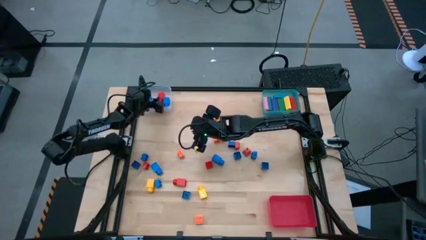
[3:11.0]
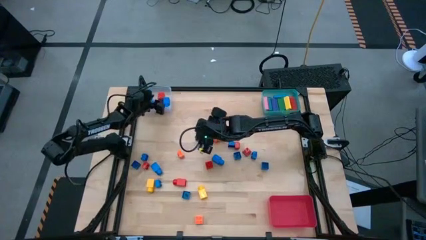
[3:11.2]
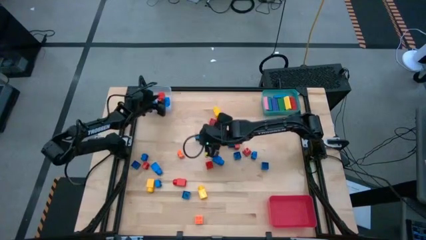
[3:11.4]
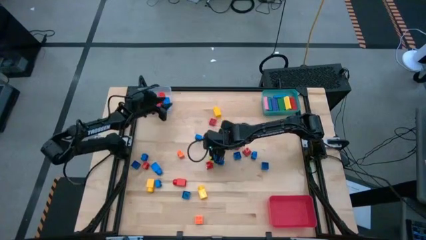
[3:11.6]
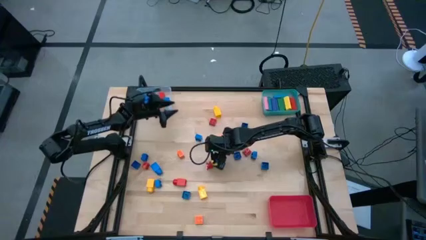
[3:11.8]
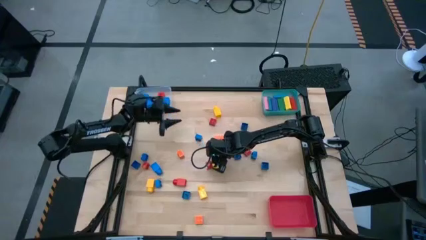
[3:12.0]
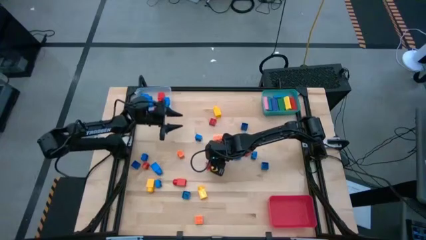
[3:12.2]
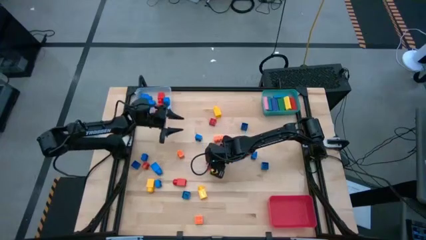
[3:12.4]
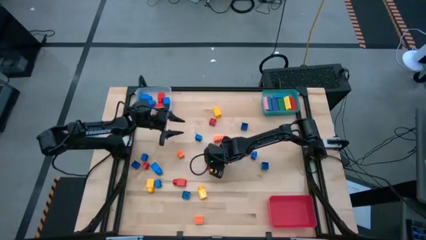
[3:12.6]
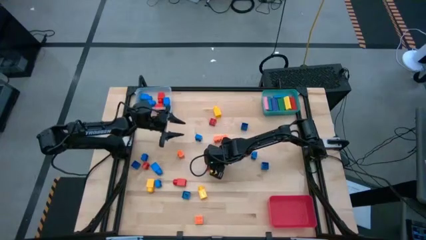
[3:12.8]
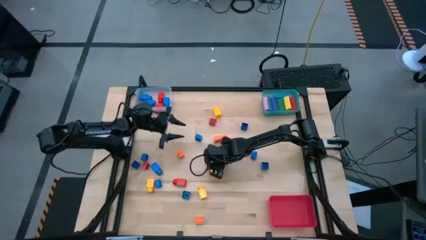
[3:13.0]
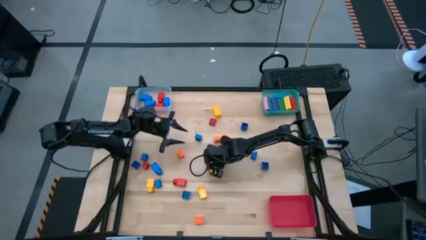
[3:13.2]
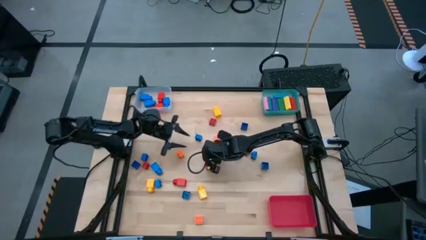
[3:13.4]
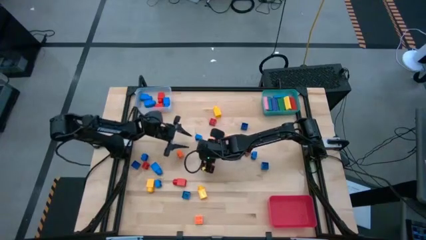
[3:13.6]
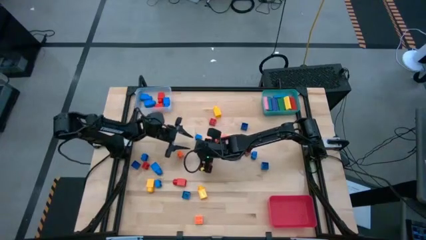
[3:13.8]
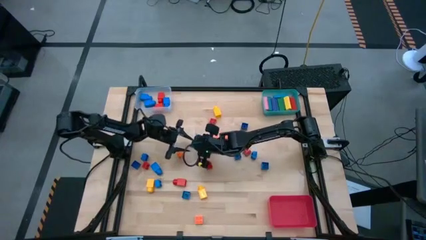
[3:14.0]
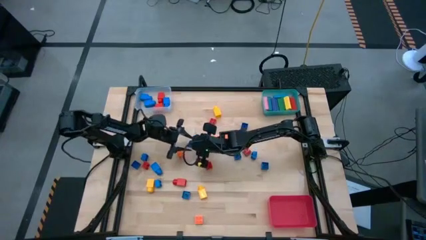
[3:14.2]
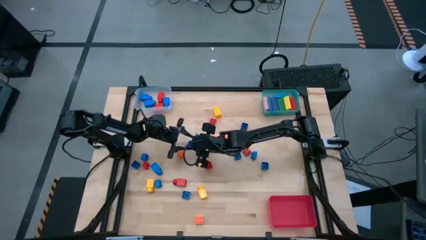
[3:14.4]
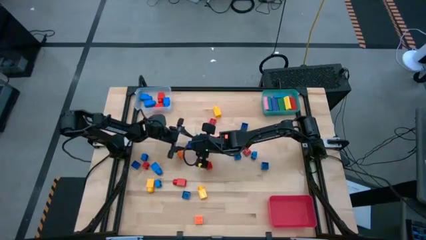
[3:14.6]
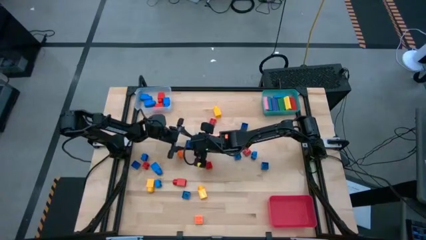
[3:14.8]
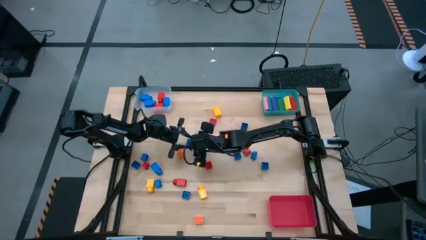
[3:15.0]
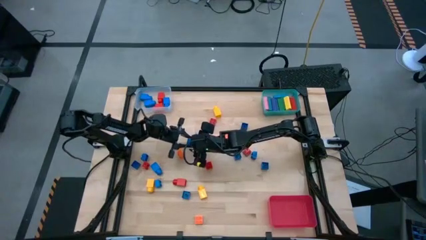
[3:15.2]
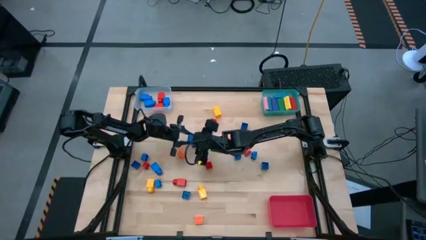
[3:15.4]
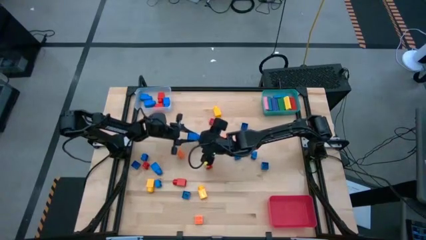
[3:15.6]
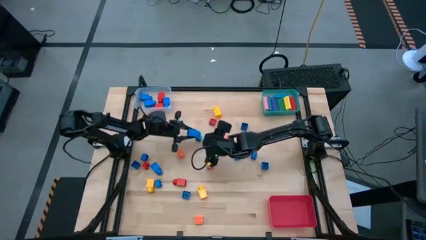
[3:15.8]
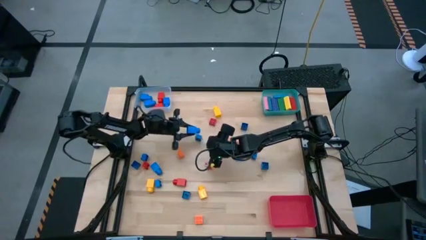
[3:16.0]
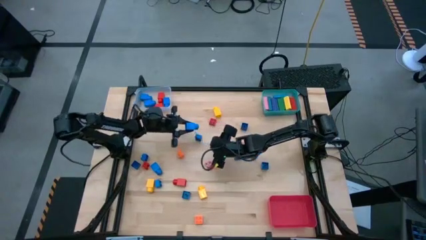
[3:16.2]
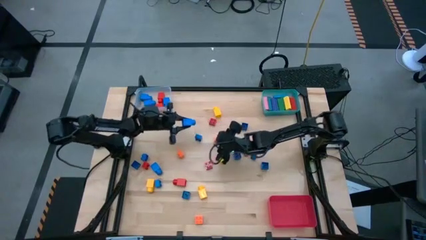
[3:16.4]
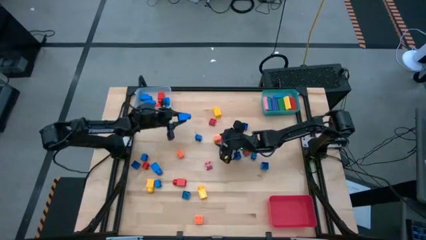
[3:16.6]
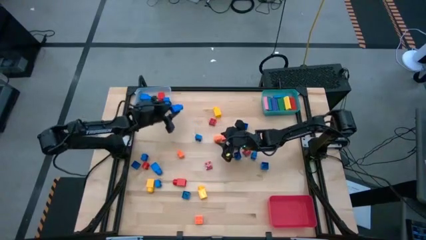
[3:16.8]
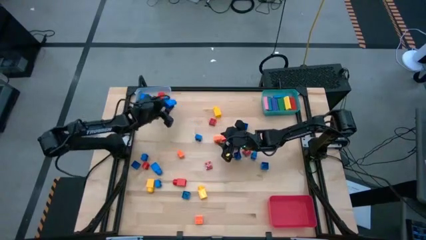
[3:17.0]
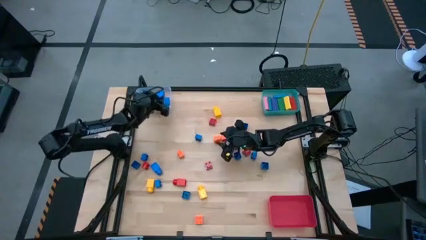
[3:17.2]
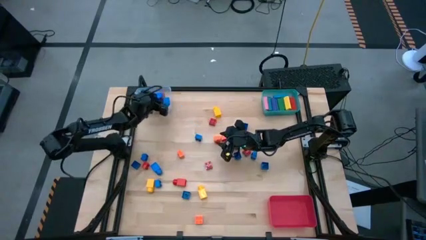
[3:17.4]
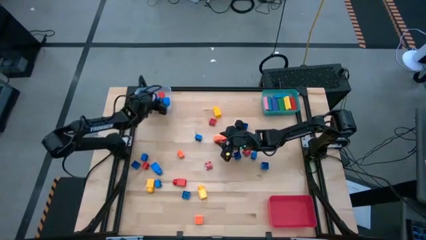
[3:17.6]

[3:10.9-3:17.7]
Task: Sort blocks by size
Put the big blue game piece into the transparent bin

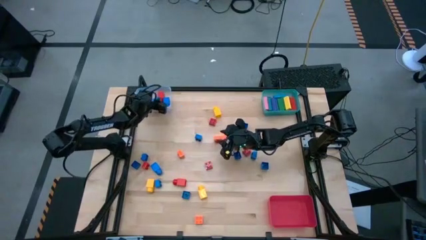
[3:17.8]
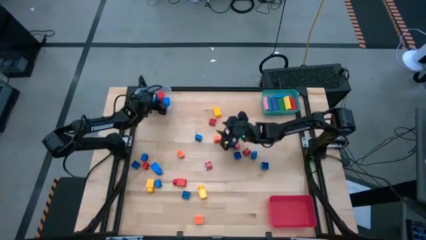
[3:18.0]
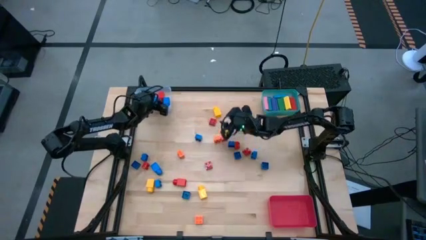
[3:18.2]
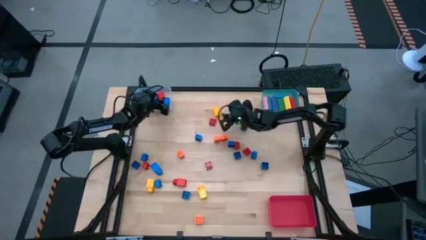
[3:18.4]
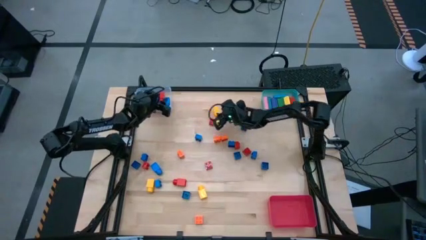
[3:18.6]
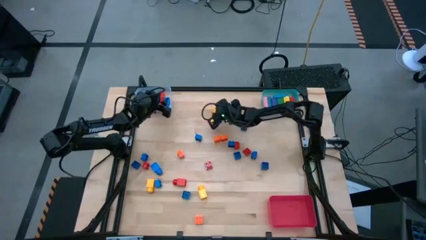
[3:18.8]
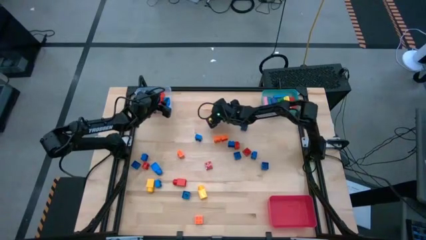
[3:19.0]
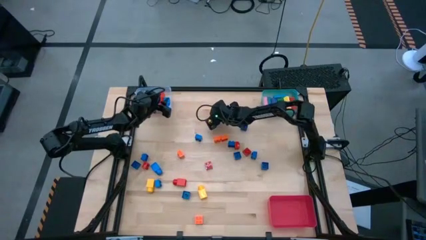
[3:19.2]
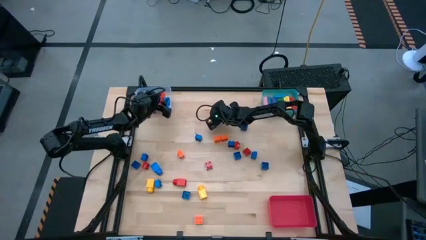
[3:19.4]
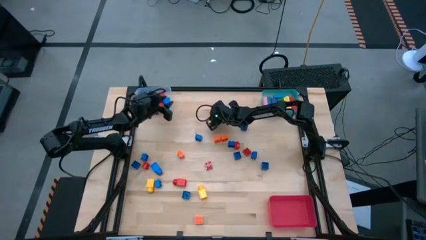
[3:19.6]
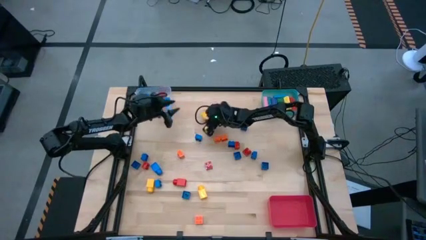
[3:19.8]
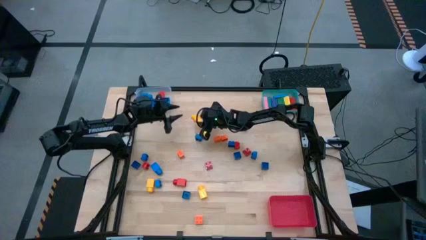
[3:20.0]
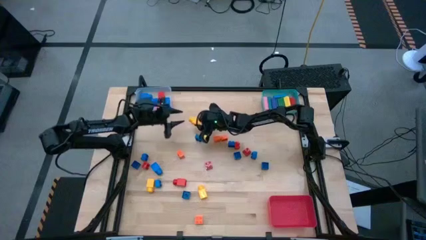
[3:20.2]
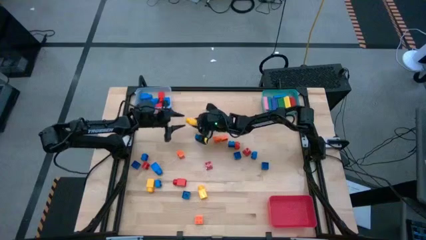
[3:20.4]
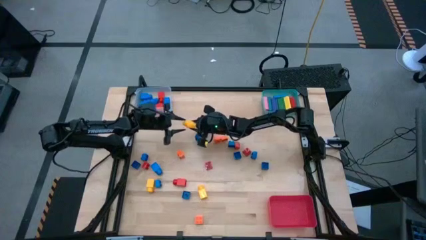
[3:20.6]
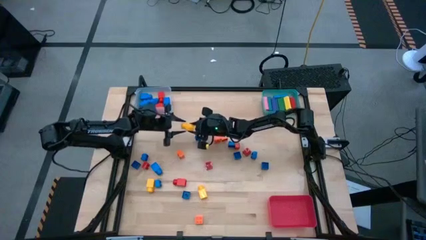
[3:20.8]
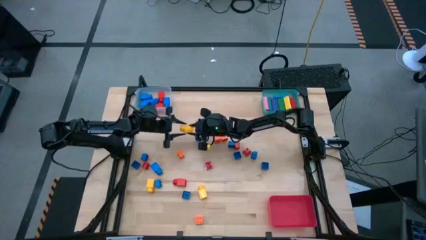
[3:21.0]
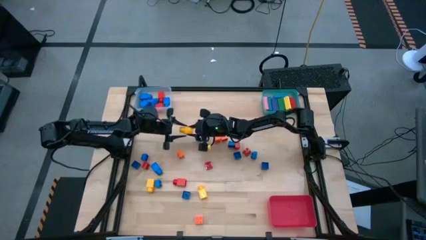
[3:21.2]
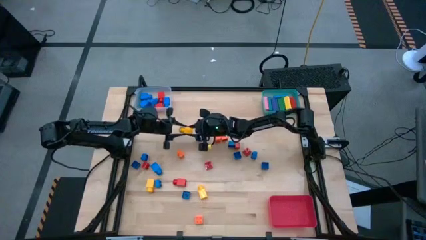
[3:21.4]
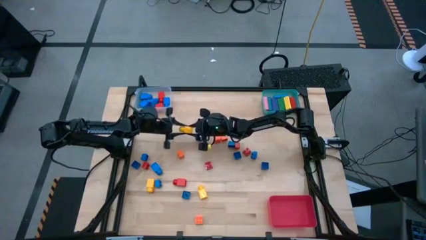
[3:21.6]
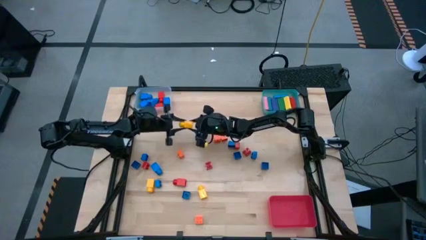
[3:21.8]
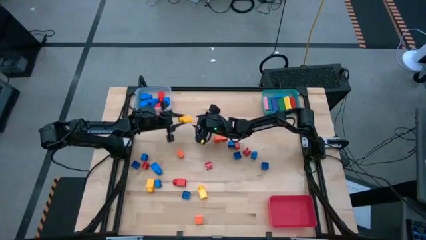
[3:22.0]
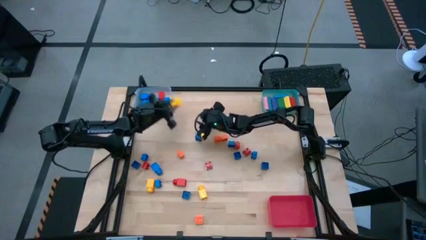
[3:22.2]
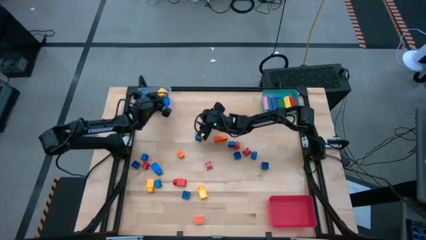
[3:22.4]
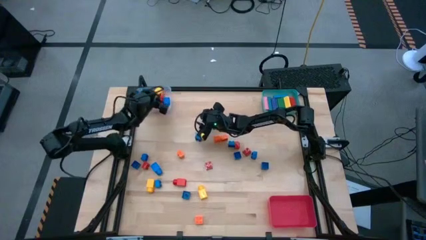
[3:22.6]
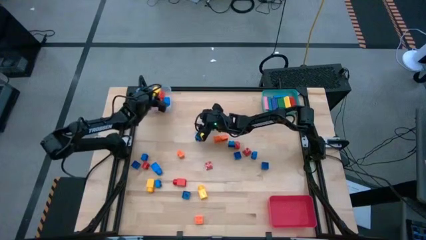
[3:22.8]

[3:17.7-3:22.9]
Put the big yellow game piece into the transparent bin

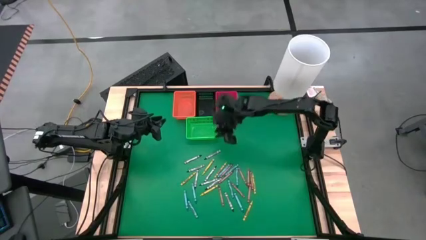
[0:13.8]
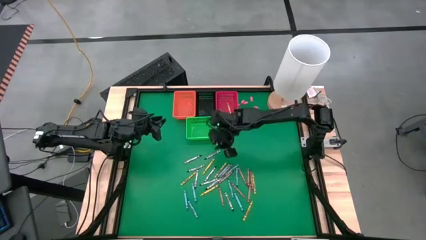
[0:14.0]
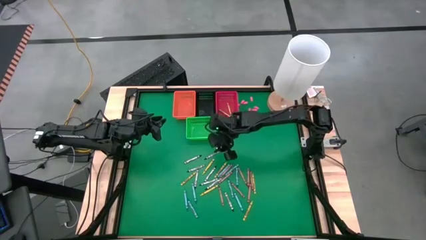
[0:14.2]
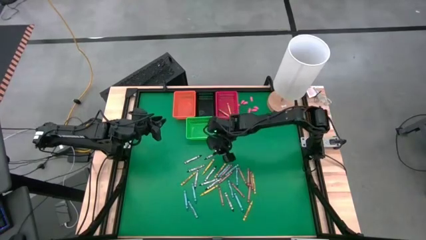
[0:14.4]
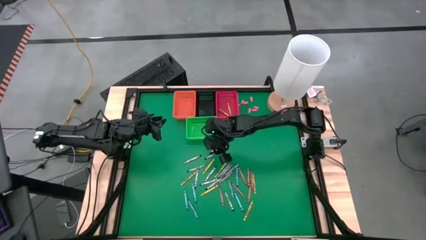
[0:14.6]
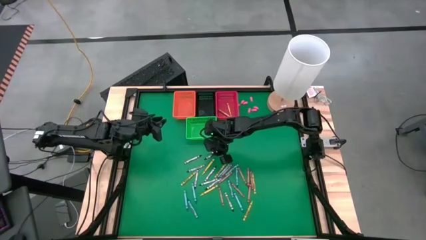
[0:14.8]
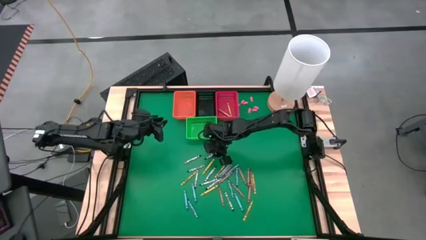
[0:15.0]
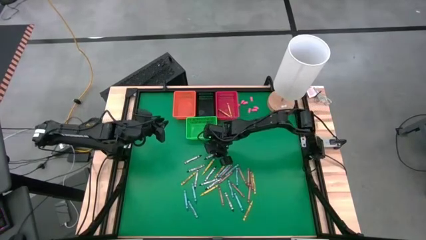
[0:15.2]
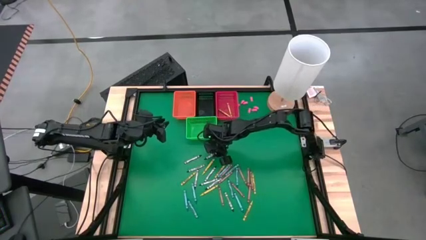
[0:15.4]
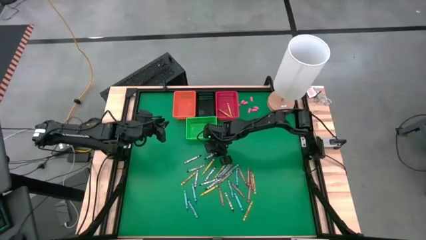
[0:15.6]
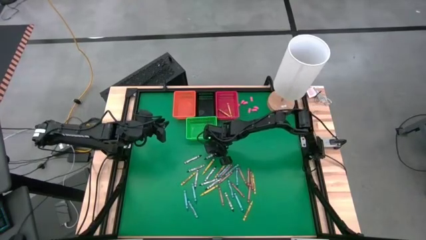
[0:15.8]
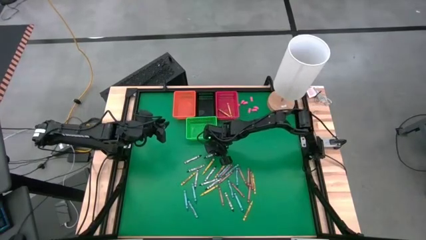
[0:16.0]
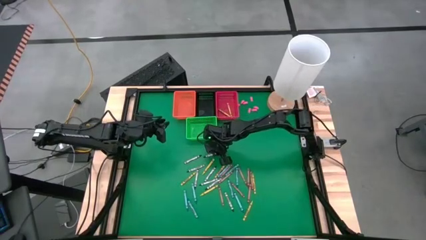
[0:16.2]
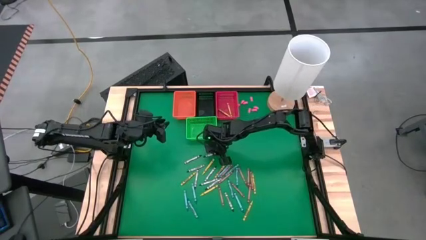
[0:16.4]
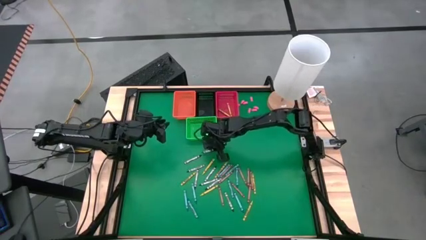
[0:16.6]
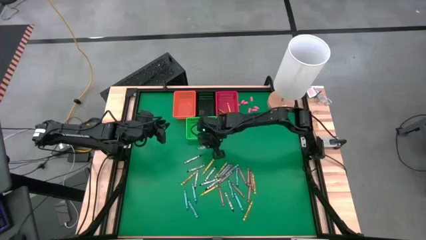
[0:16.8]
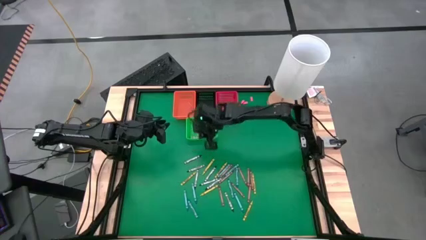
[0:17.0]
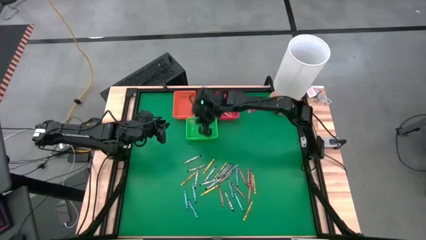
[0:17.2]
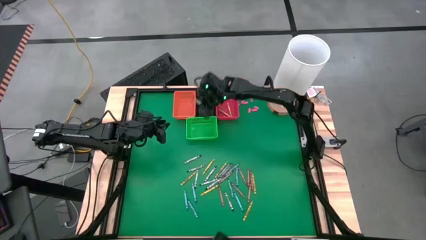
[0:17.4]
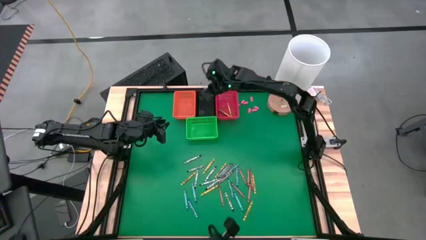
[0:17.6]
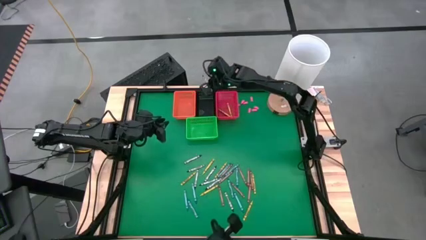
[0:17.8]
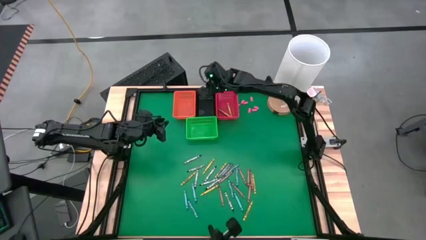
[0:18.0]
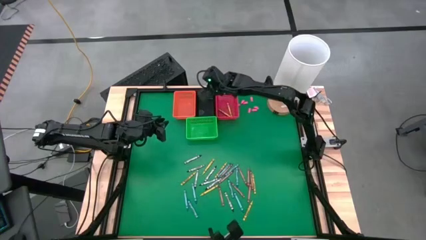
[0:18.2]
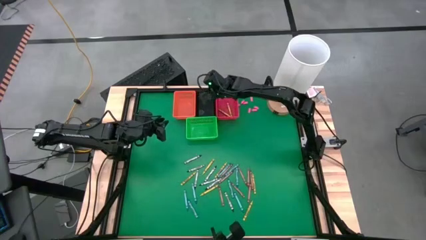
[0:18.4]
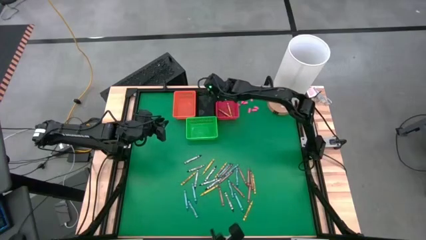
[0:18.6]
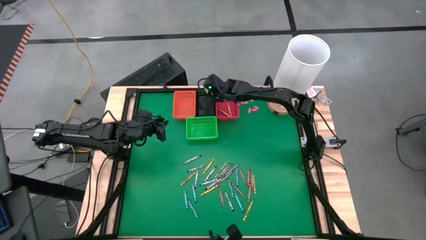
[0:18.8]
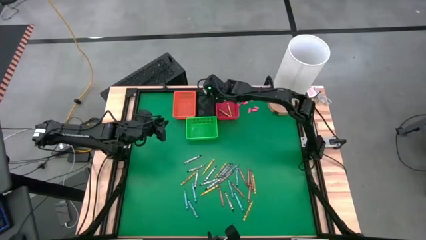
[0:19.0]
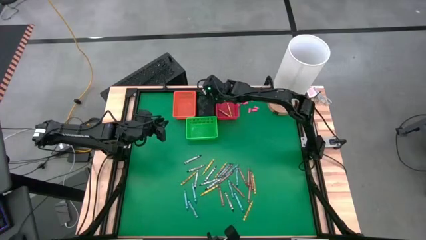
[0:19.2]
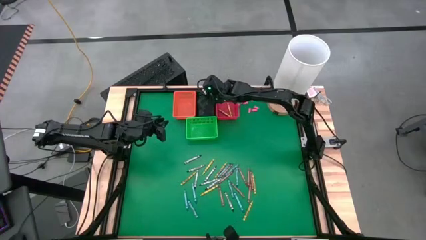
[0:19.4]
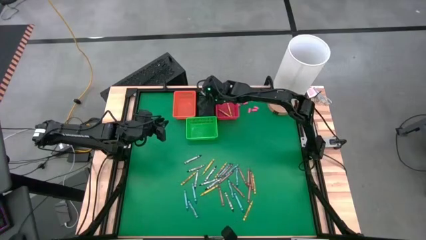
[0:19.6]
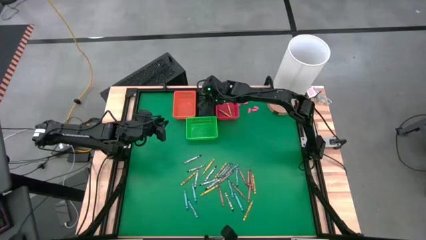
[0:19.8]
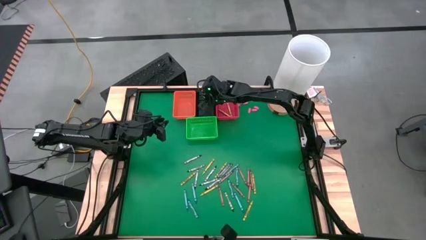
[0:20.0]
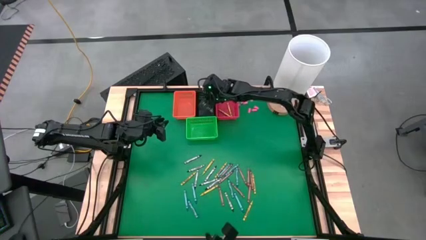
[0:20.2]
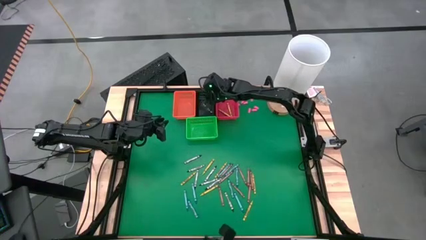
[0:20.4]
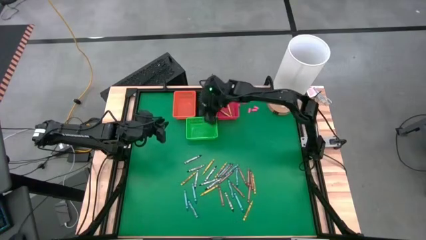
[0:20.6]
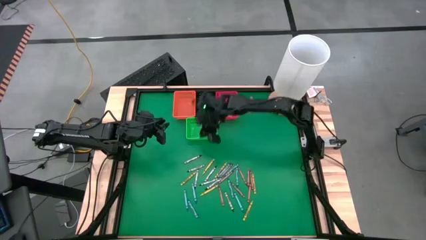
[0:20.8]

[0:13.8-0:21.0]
Task: Sort crayons
Put a black crayon in the black basket
